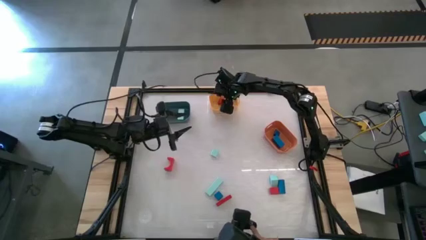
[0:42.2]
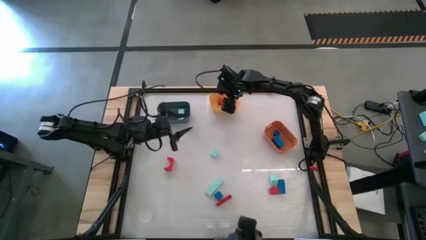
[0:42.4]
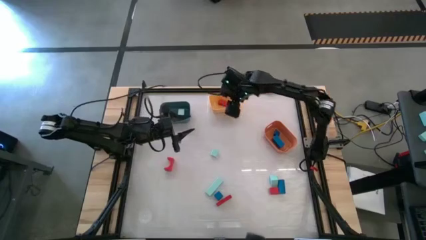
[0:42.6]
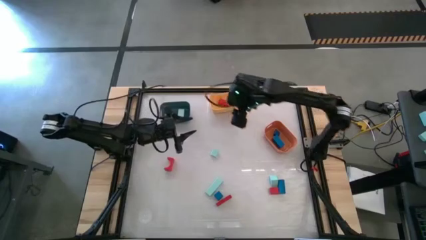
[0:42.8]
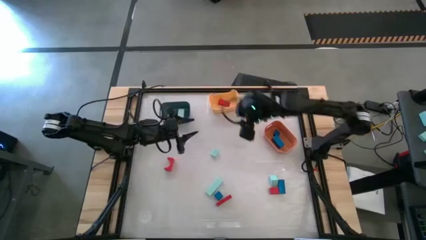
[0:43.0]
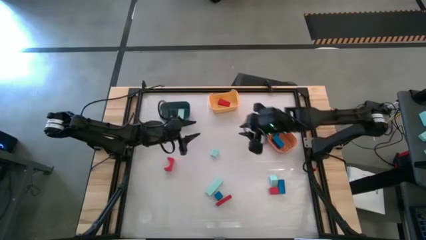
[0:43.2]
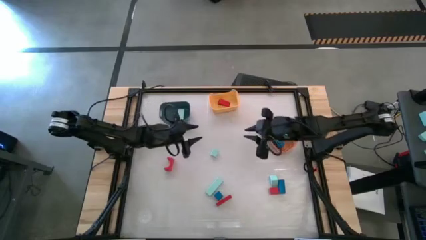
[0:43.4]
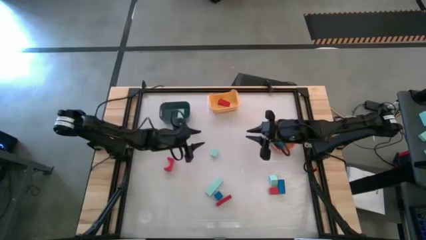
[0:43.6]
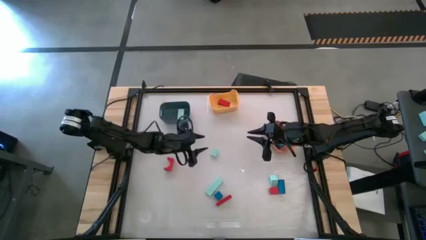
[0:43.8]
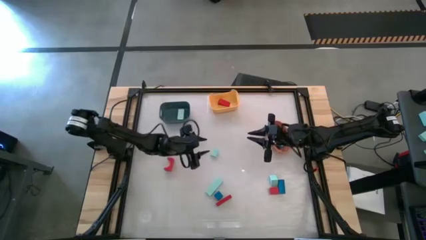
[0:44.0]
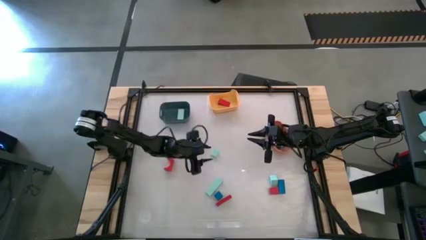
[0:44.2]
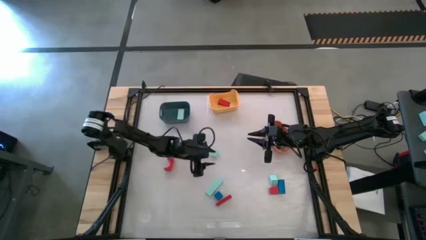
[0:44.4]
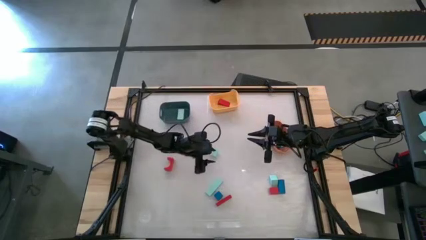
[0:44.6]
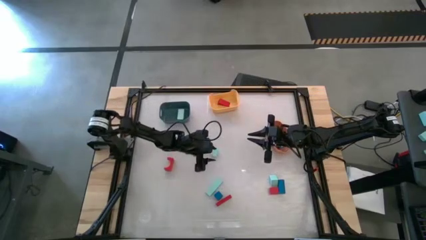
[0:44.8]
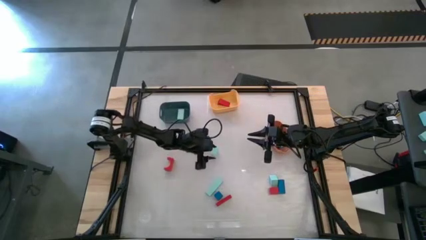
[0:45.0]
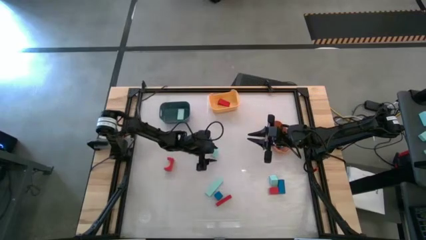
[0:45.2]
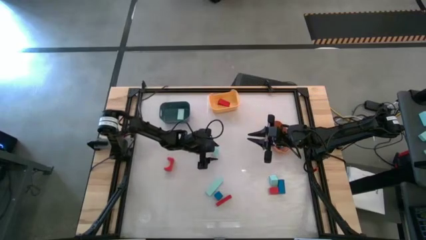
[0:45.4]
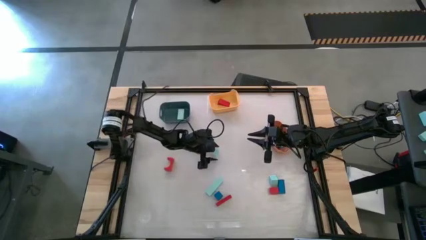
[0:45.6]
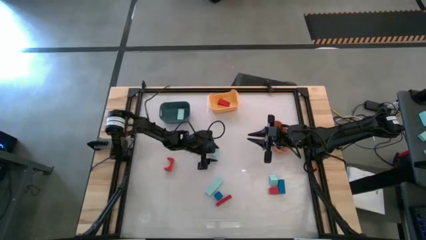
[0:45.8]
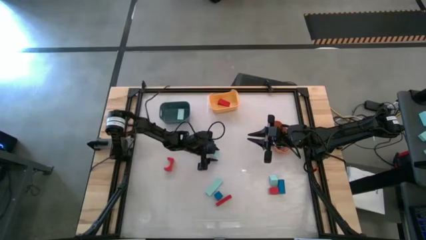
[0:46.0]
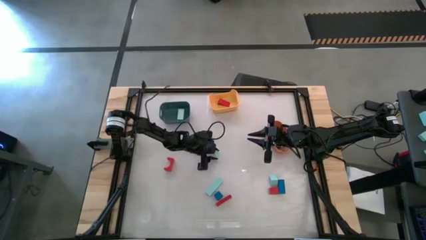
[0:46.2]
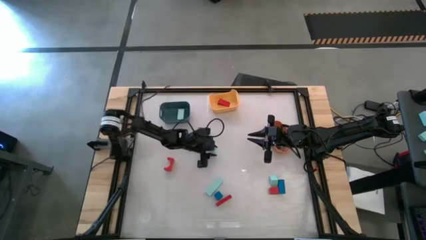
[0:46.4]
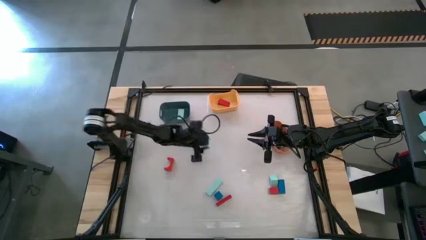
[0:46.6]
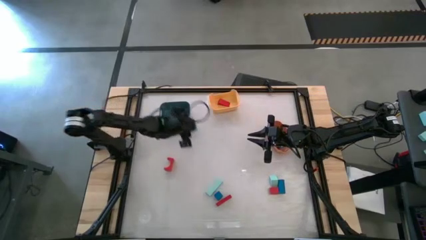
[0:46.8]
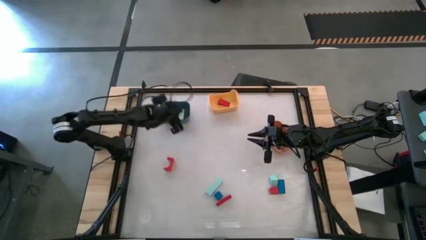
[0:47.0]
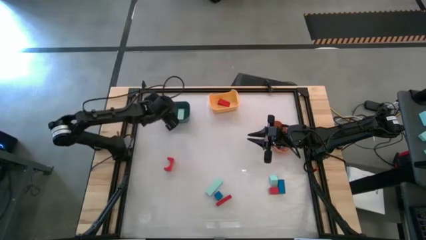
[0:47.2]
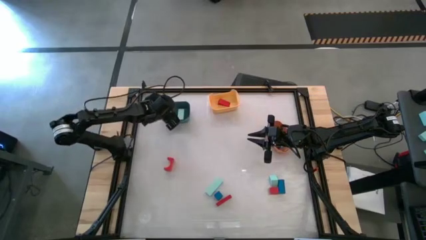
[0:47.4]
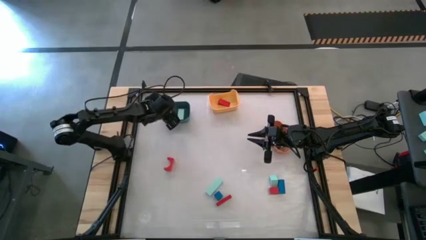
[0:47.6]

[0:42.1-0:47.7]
Task: Sort & place blocks by color
Put the light blue block into the blue bin

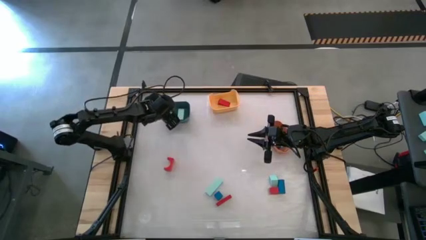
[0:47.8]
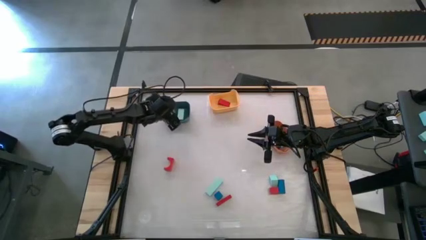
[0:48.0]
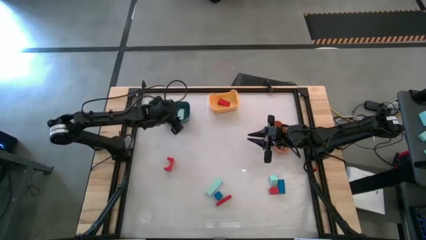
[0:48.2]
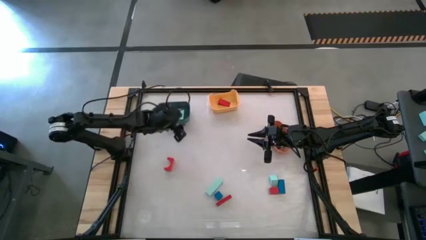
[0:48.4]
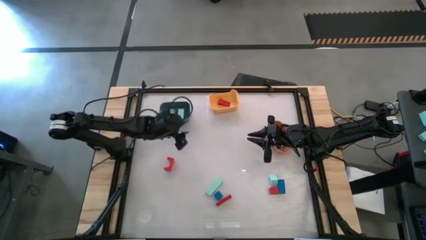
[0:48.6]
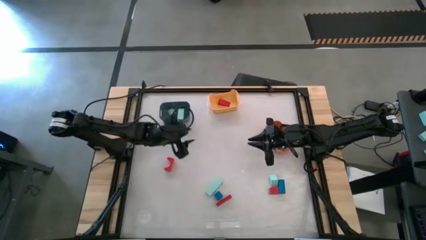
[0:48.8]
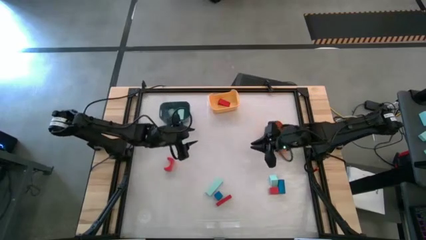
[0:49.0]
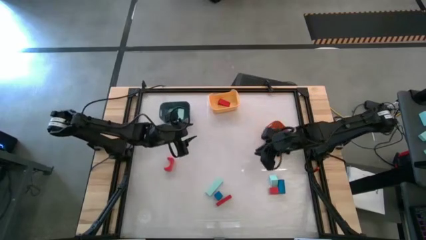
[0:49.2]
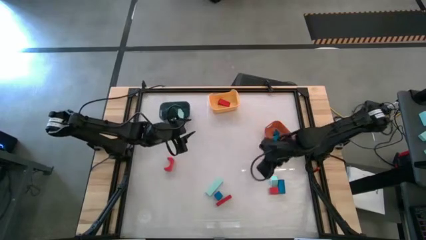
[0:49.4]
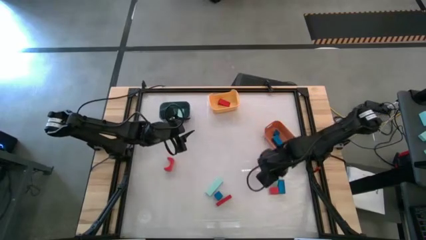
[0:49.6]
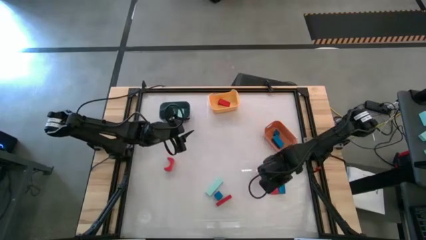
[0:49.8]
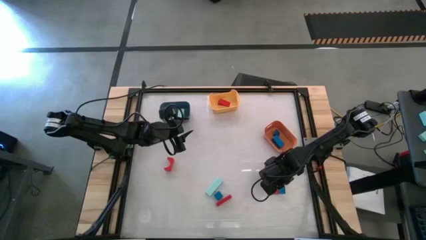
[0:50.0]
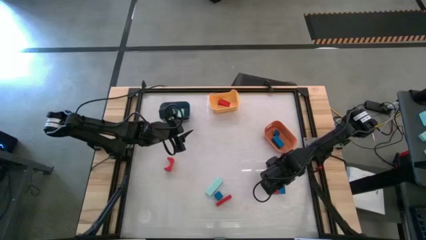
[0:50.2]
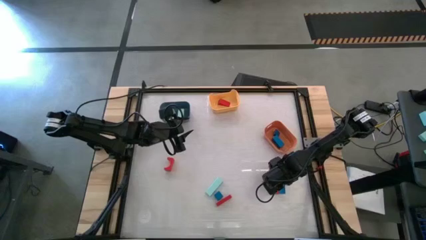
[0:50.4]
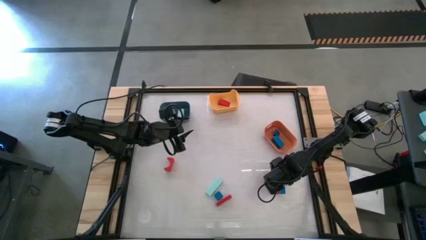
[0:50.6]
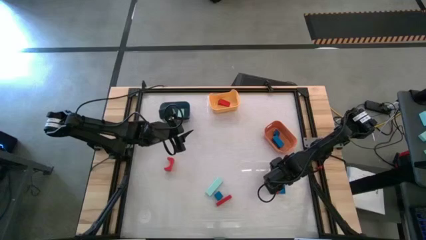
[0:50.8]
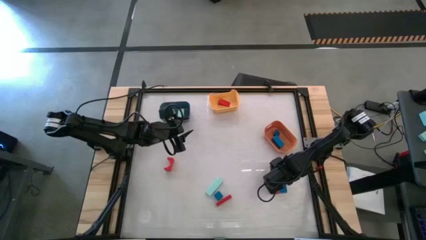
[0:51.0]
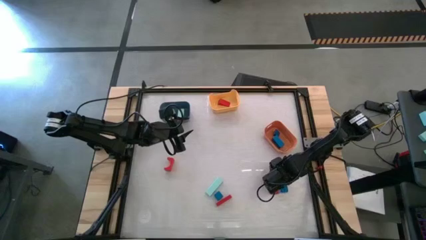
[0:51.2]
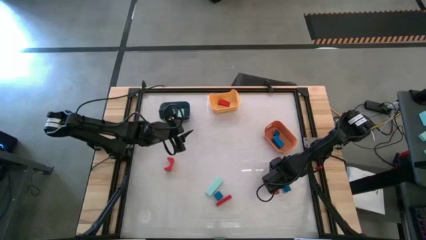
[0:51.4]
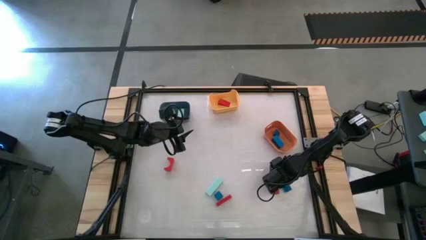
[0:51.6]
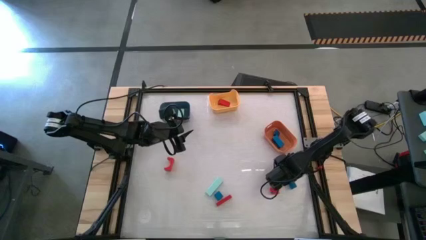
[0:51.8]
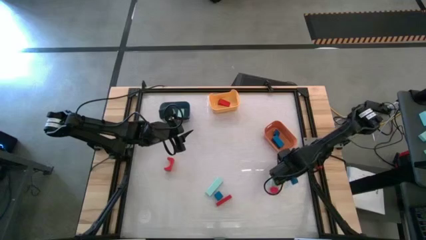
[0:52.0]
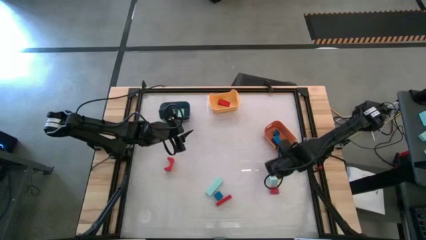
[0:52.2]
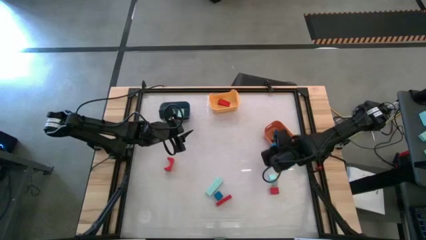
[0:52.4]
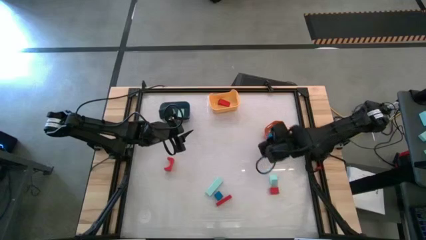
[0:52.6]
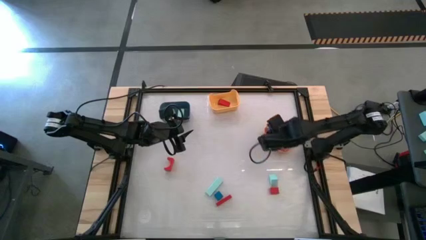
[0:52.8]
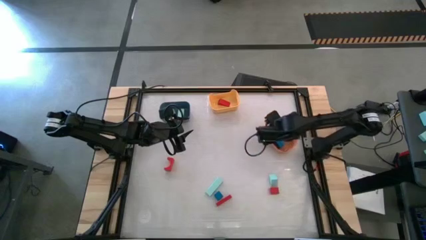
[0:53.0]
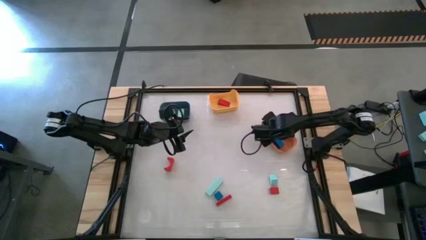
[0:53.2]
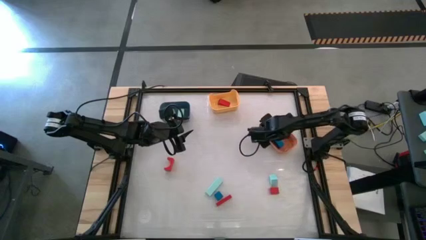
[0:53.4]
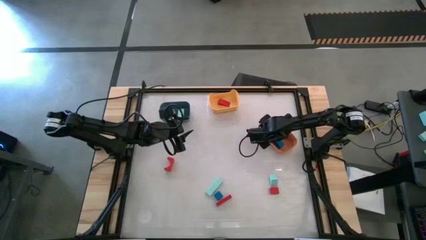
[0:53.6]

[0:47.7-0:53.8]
Put the blue block into the orange bin

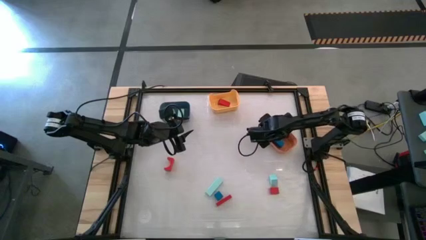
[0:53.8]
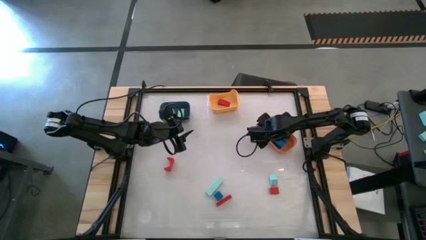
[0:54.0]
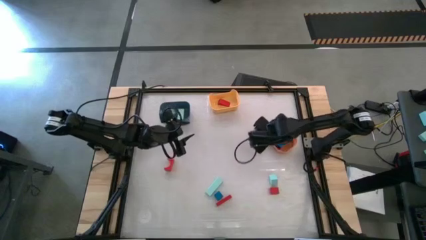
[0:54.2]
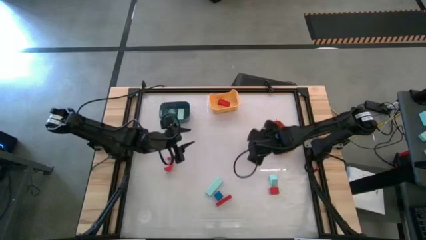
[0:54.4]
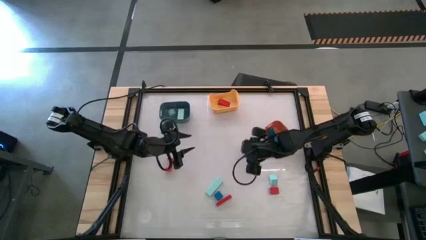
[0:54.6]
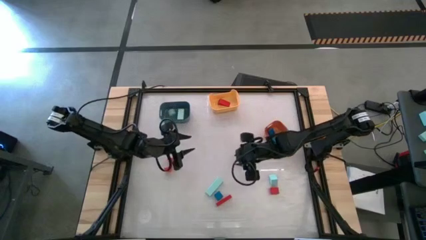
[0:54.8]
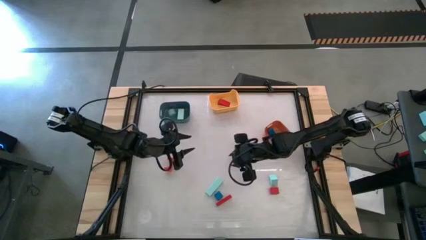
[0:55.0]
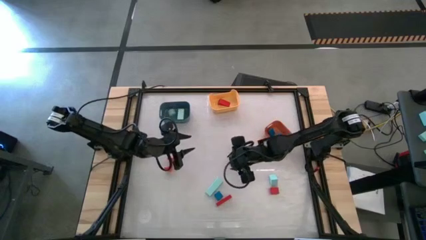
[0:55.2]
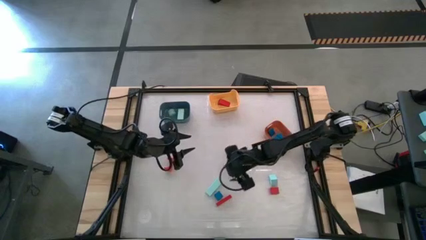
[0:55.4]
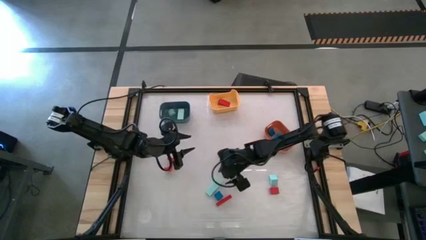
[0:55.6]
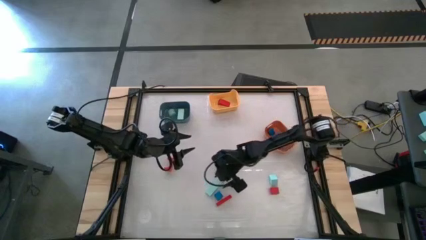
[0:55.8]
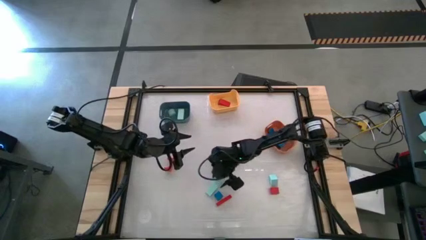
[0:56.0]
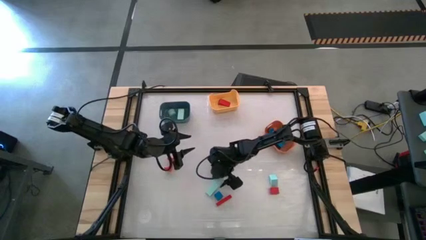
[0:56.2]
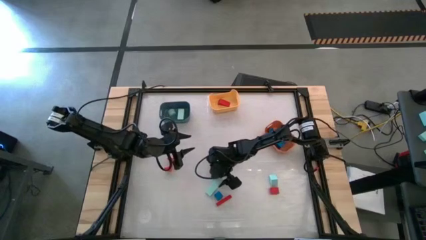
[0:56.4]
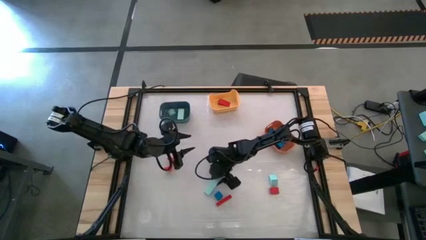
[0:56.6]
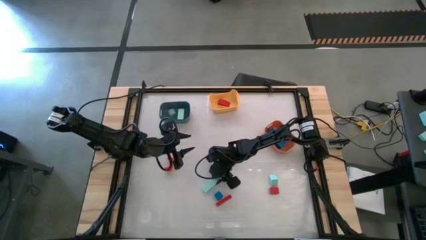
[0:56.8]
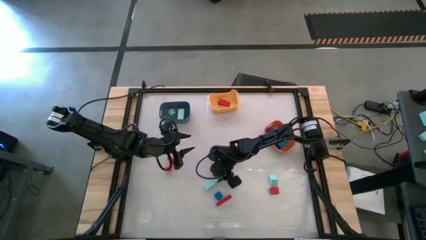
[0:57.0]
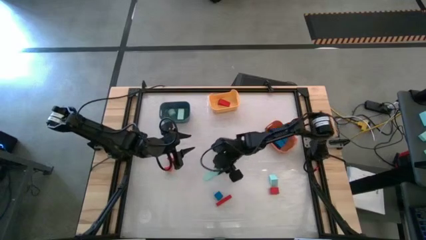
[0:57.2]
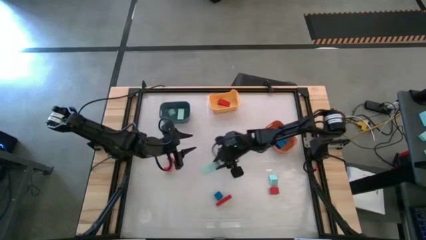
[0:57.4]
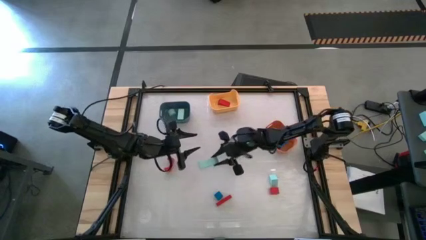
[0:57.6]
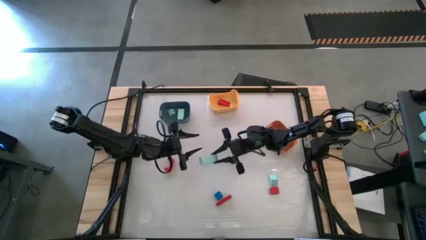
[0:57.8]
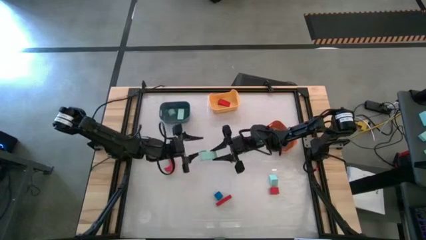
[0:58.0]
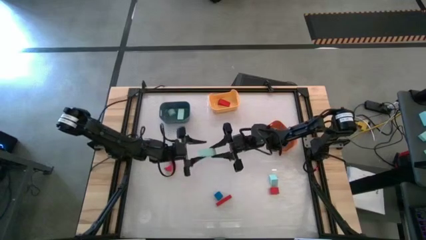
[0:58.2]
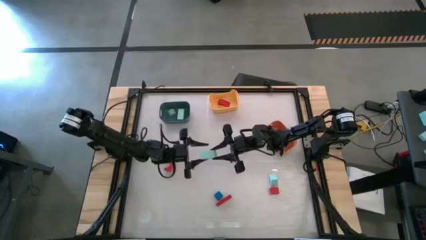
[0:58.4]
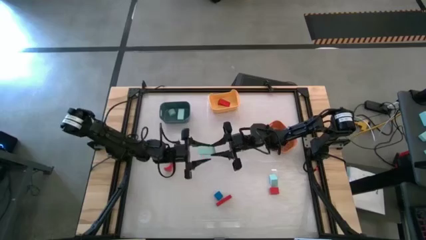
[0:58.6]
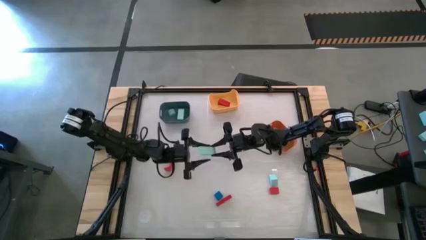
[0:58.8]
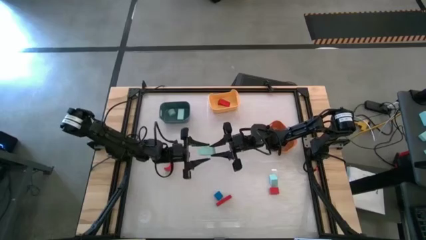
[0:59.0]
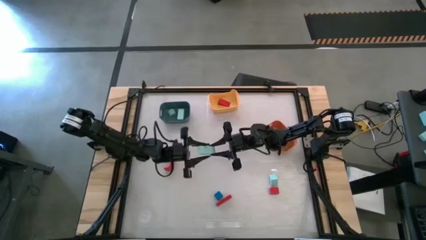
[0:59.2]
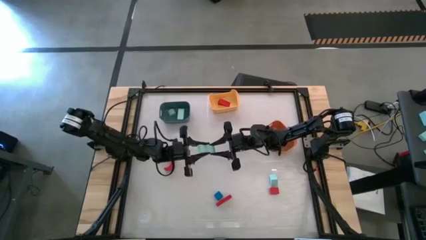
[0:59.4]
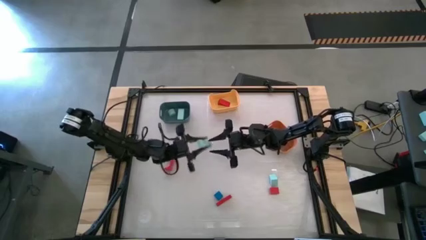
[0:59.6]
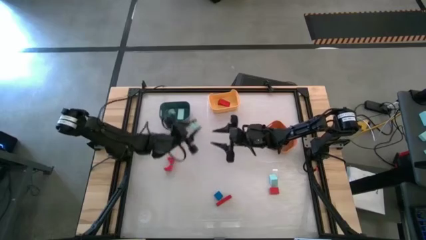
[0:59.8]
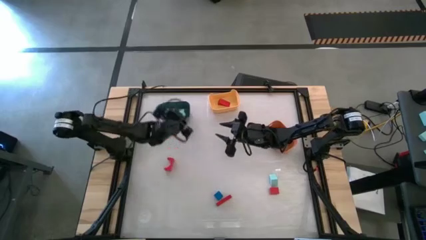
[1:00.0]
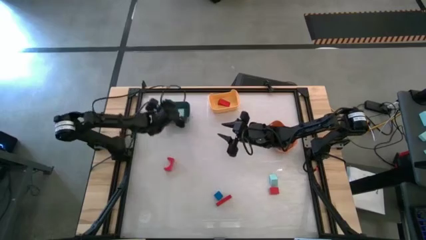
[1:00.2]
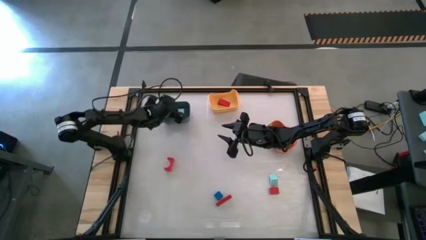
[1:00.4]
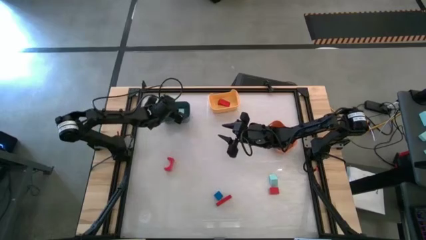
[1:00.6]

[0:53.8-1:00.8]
Put the light blue block into the blue bin
